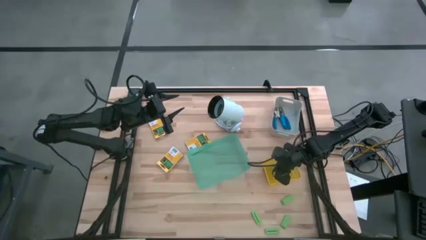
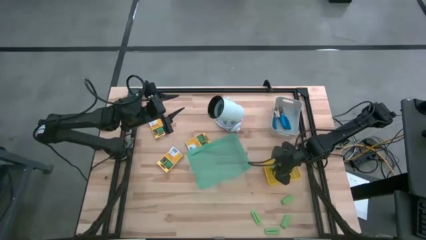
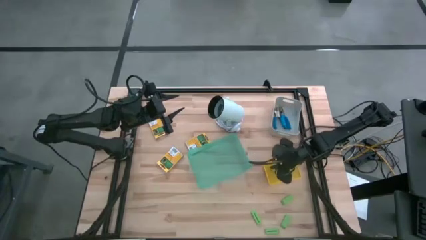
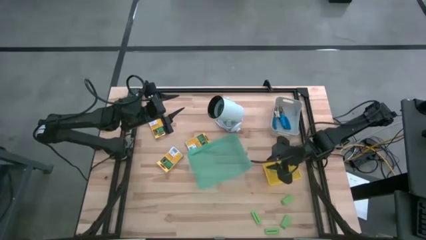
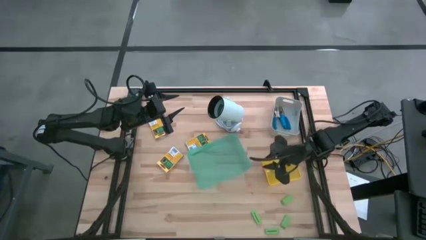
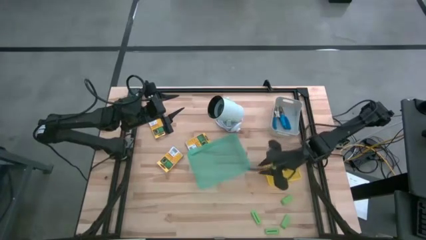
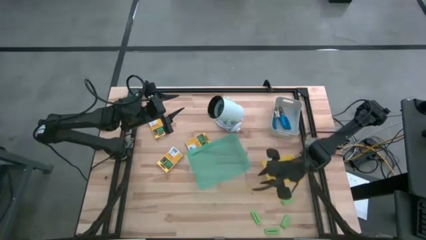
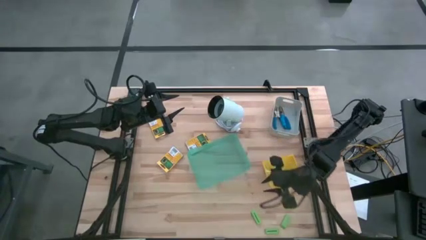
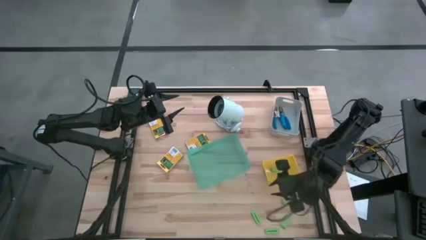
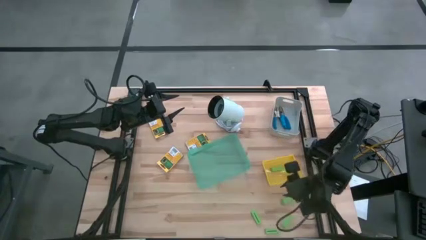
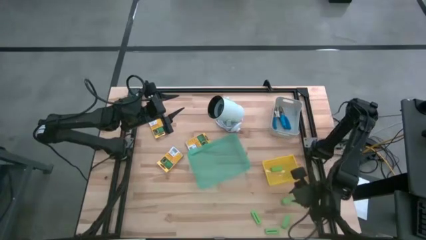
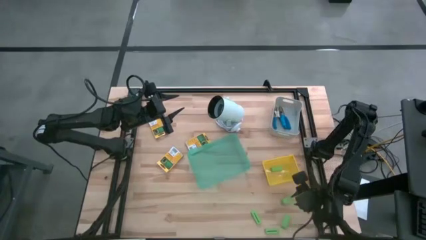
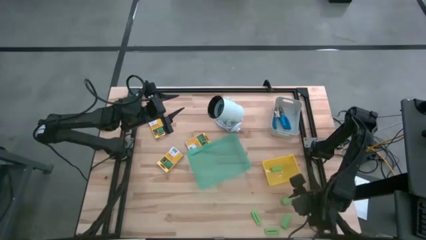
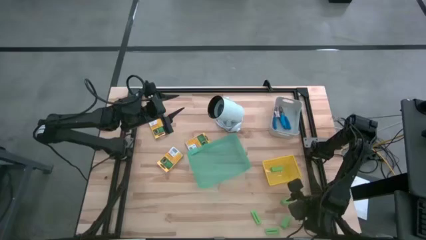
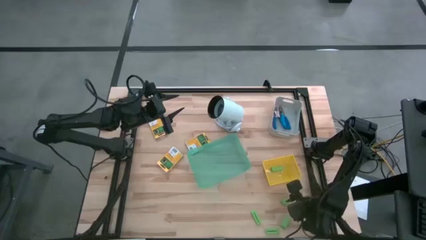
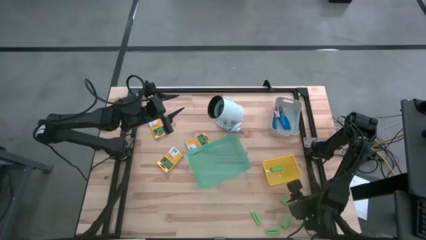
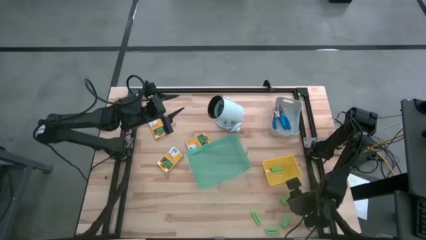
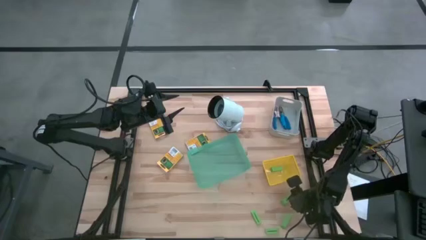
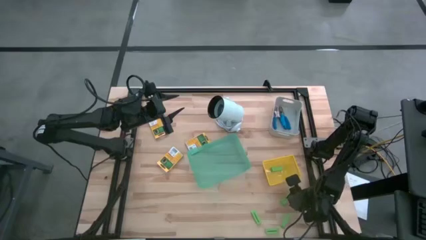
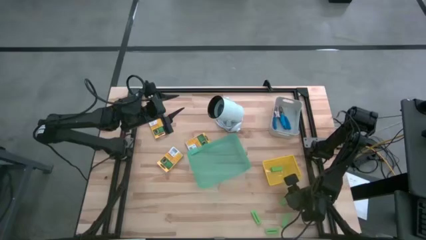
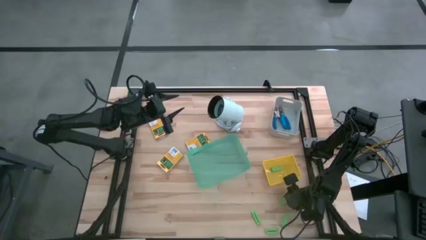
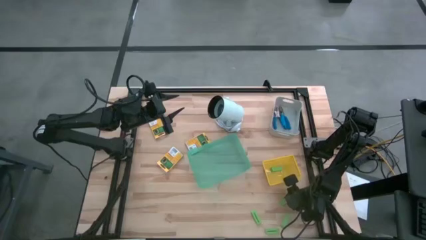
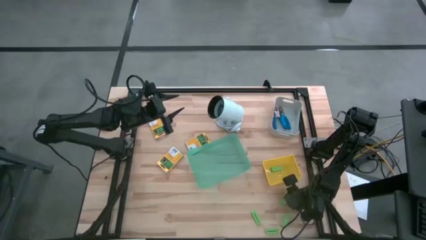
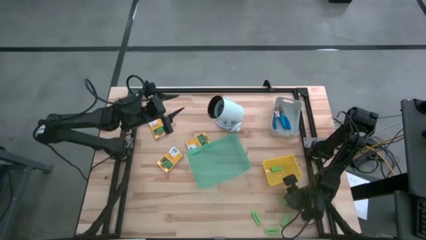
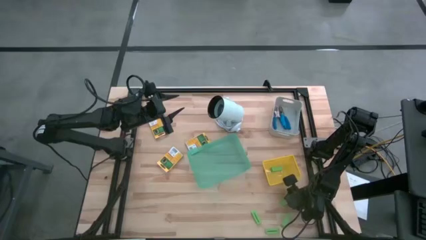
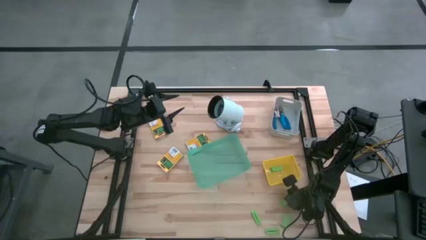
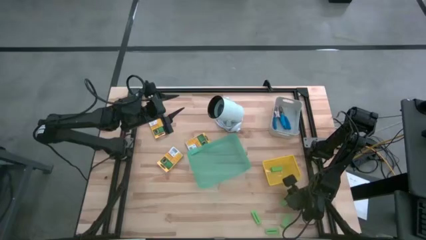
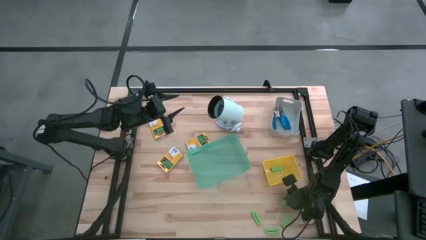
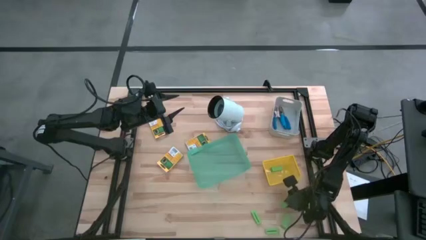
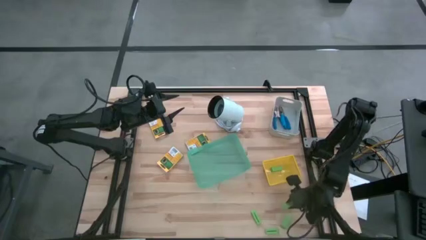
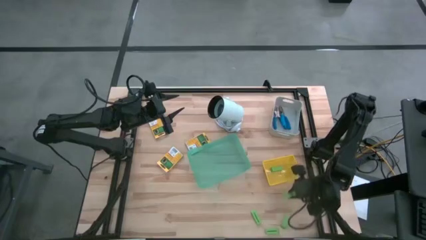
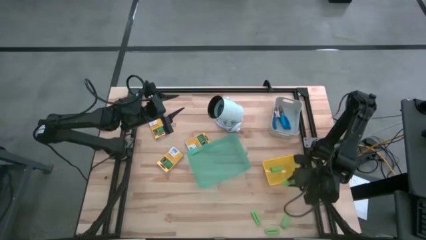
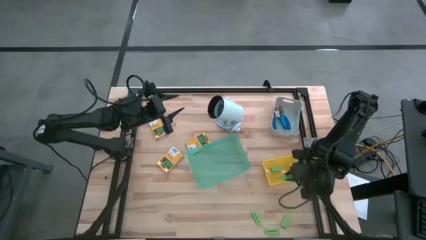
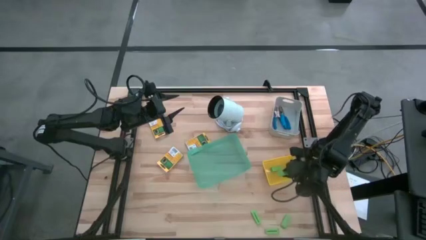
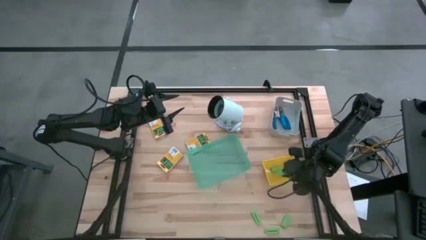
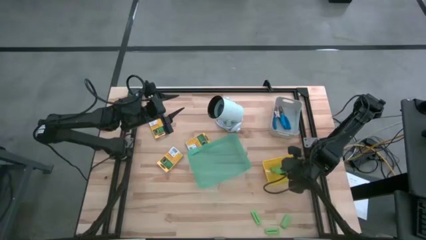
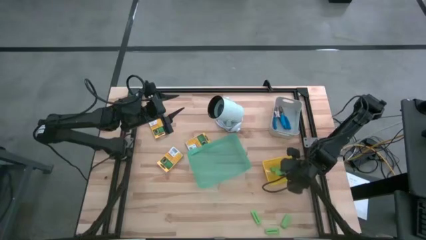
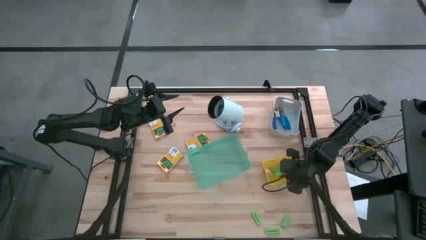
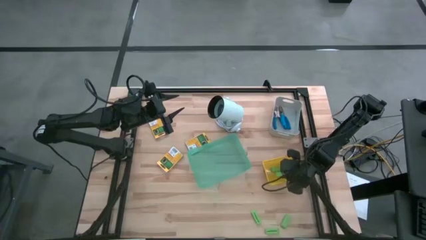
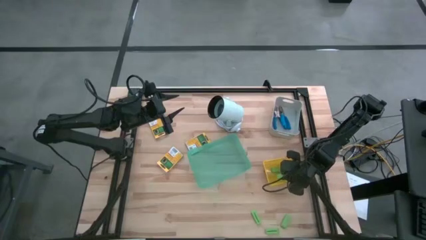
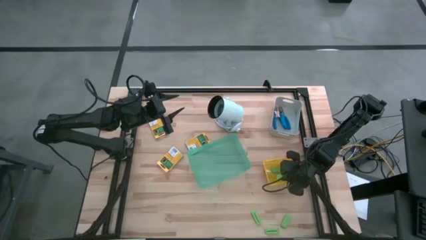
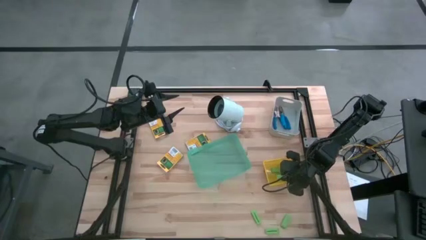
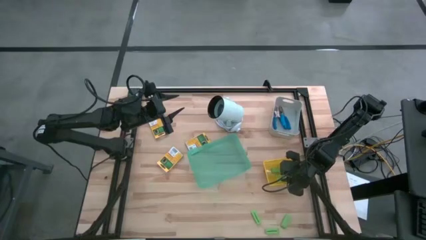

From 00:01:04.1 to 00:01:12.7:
Task: Pick & Place School Supplies
Put the green eraser into the yellow bin

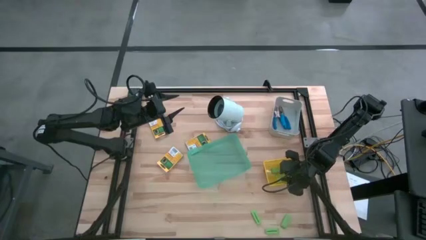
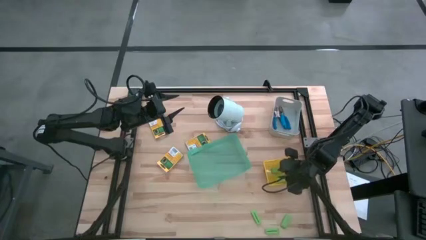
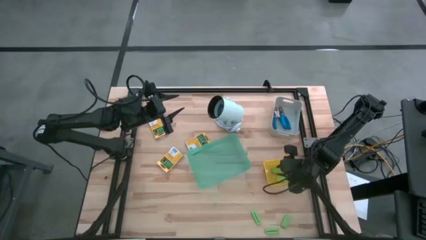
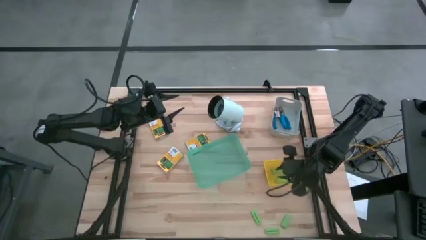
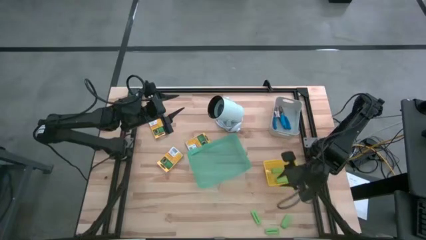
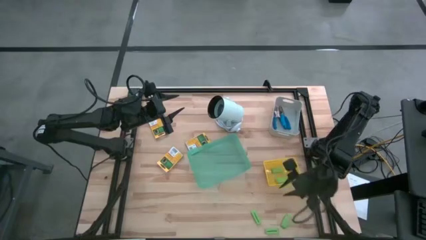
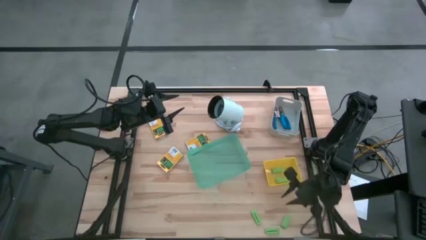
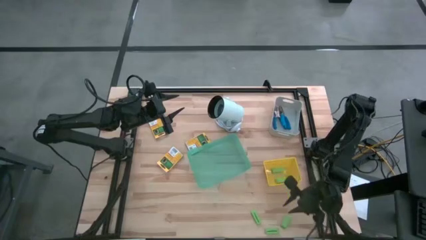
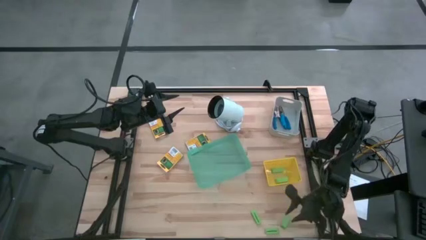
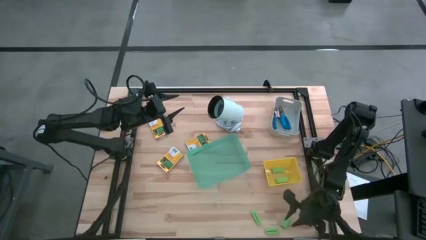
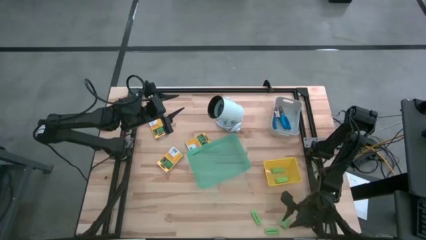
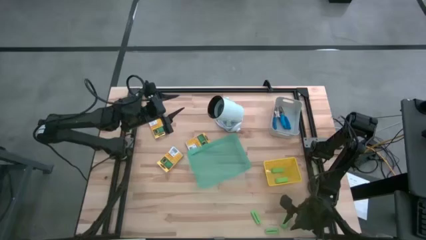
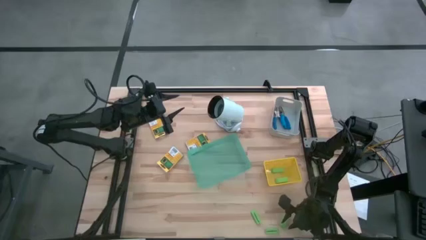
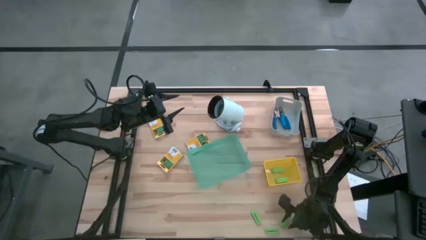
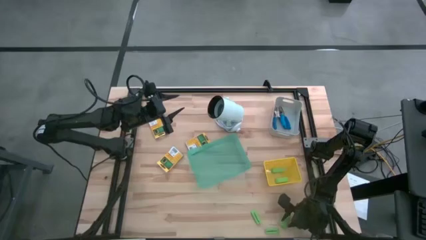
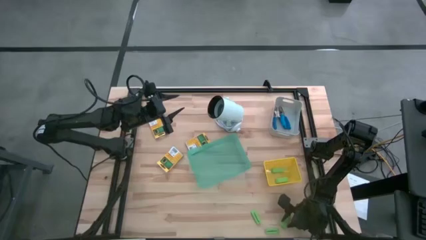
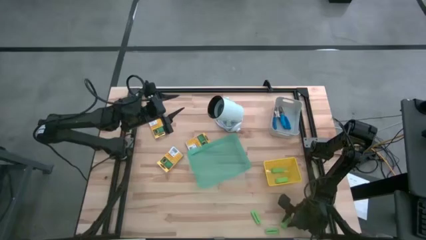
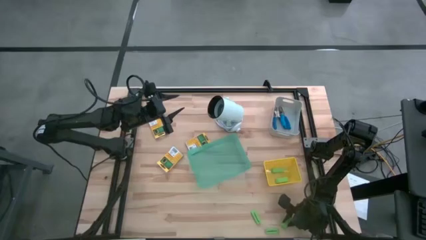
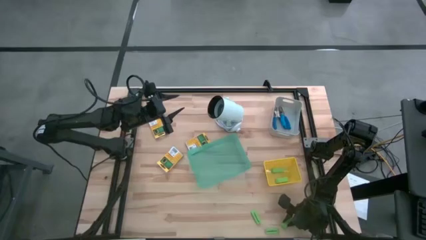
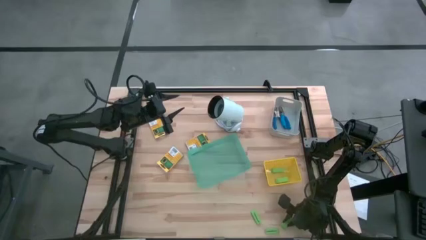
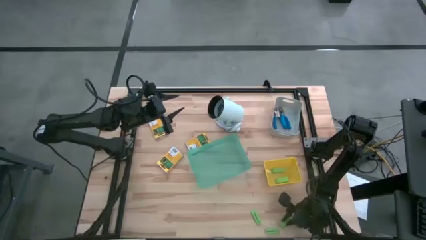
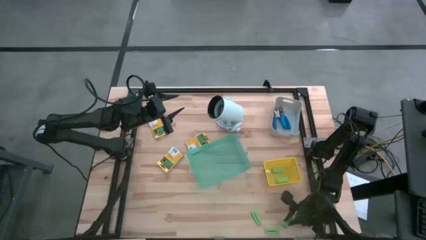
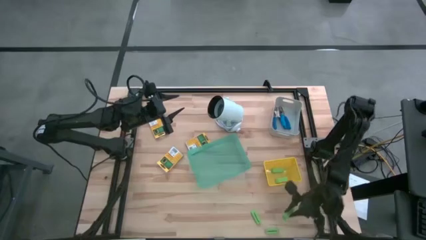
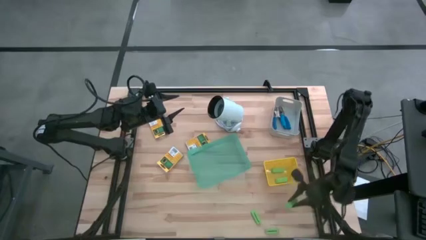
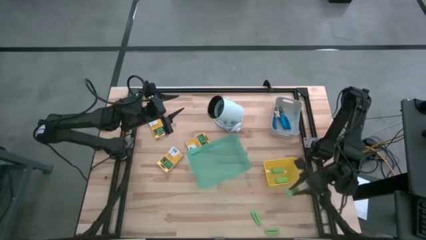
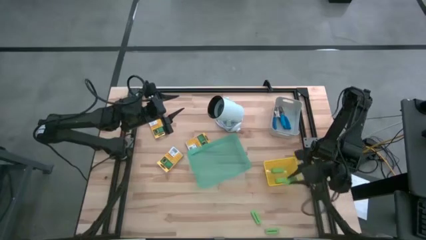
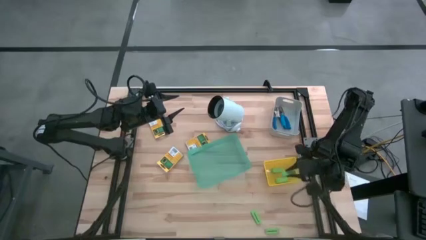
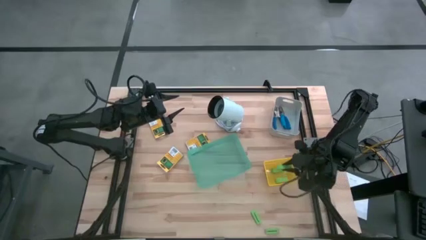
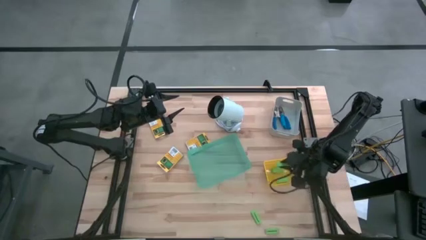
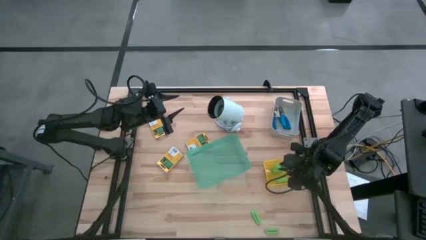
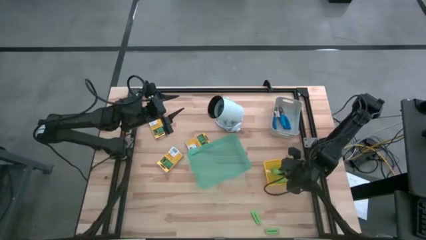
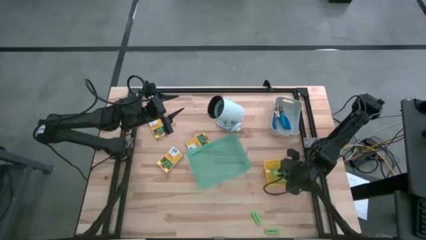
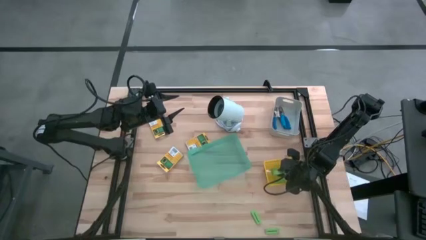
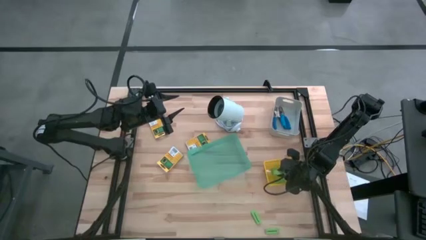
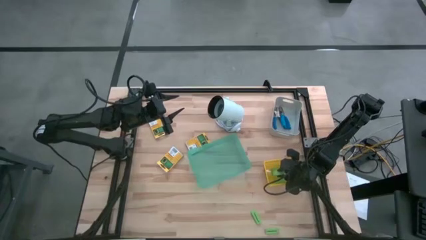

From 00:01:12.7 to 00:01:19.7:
Put the green eraser into the yellow bin
